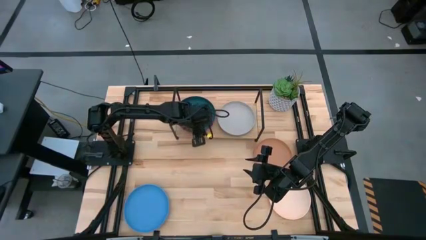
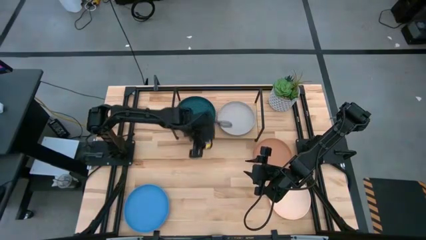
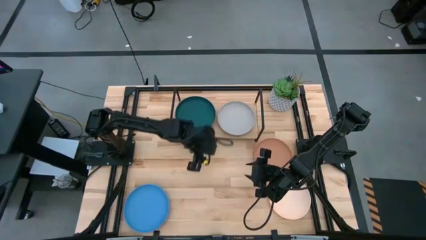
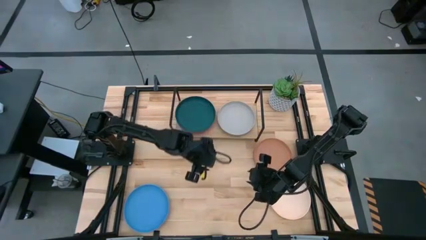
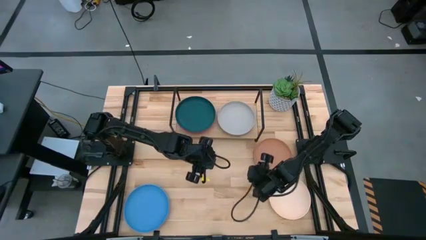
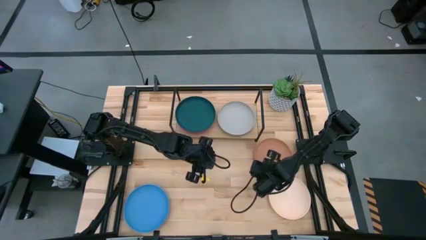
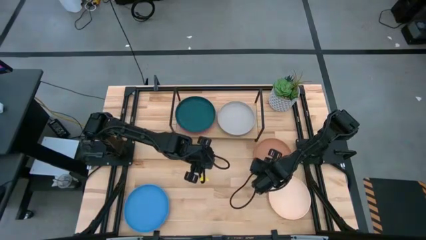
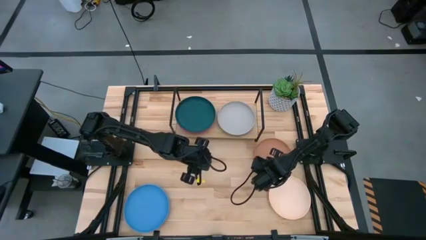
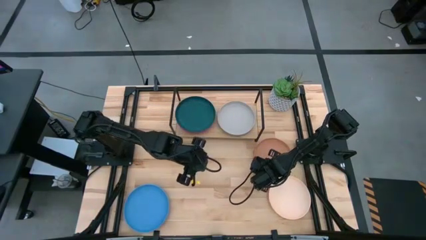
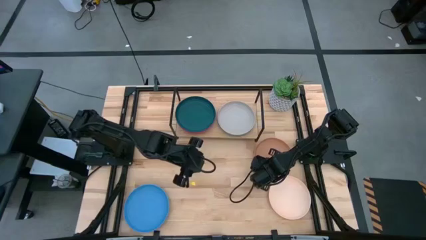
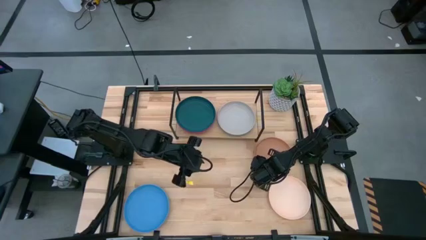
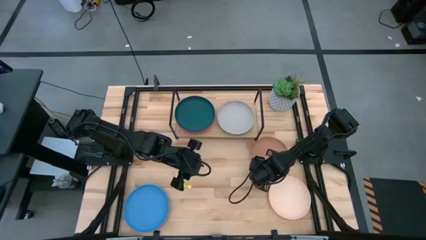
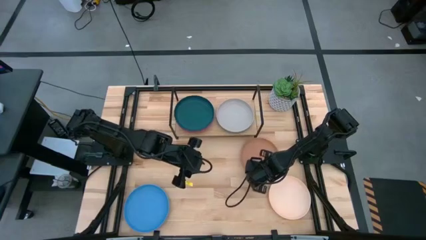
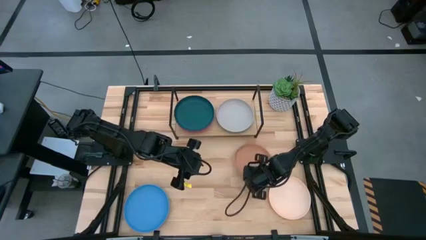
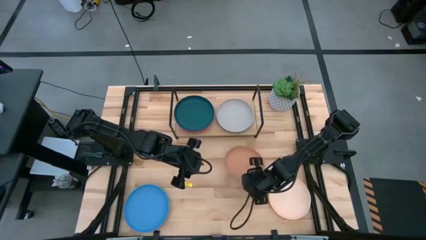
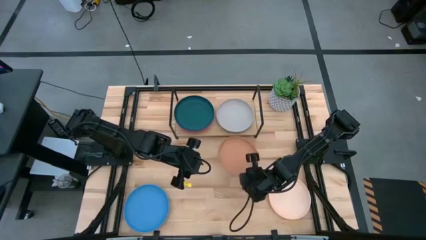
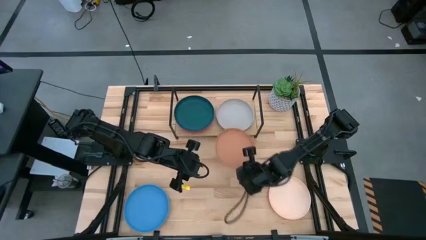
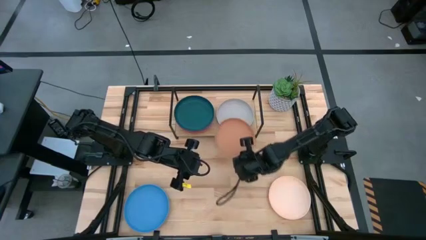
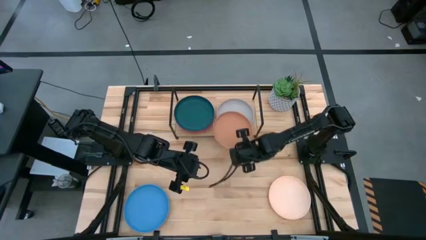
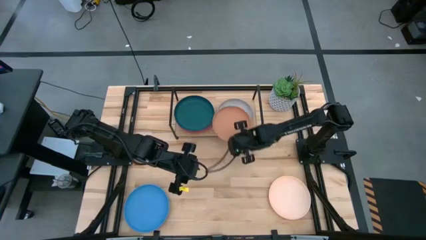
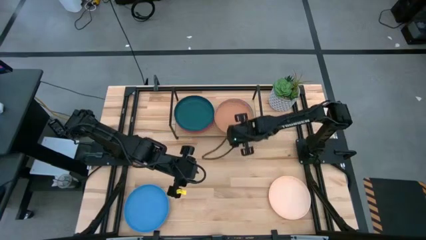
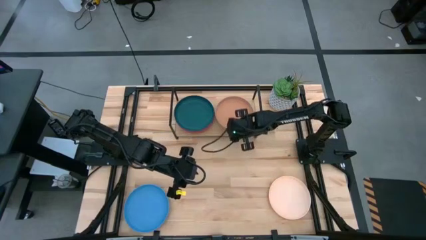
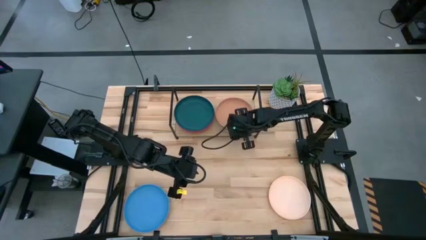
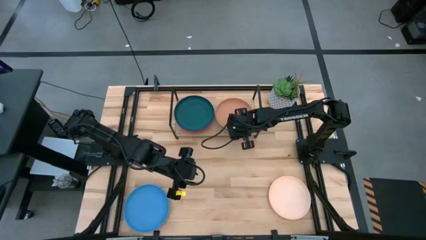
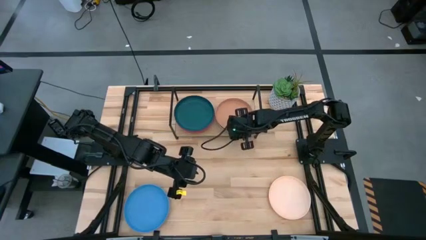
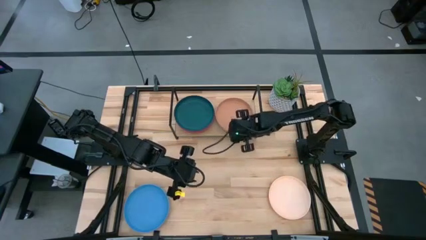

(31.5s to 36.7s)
Task: Place and stack plates onto a shelf
Stack the brown plate on the gray plate

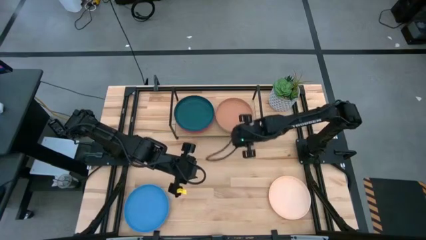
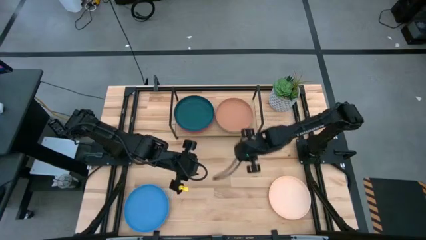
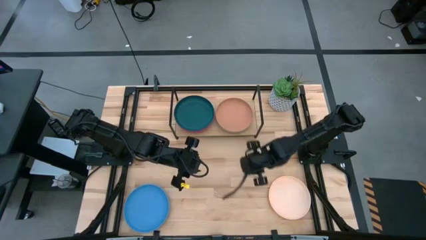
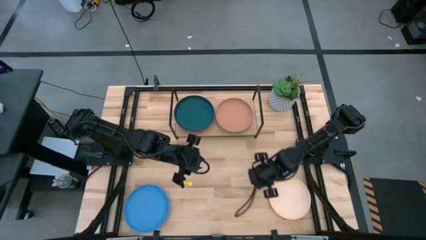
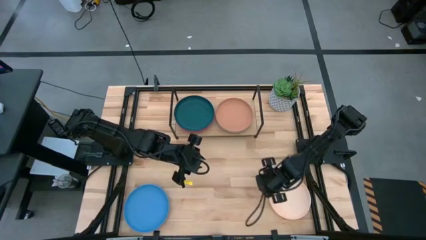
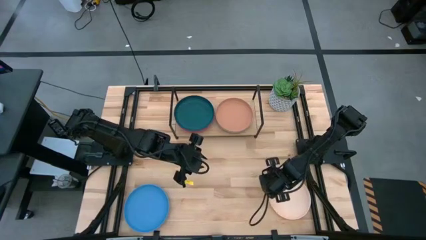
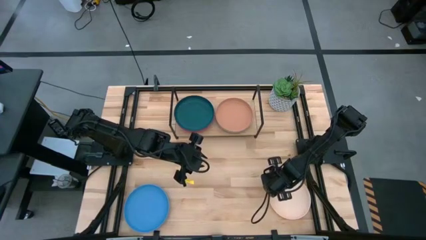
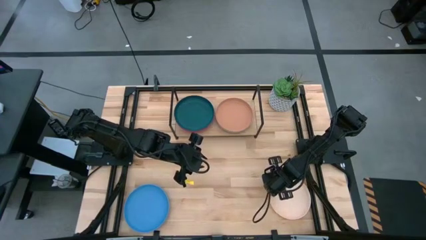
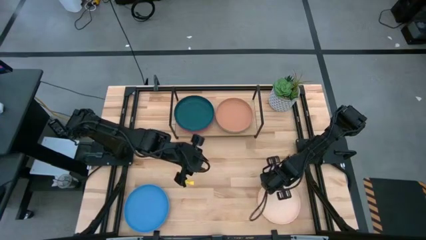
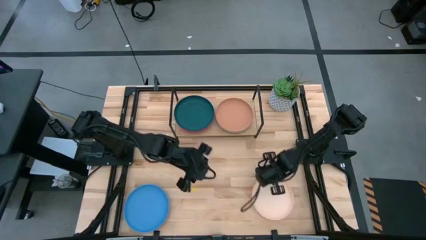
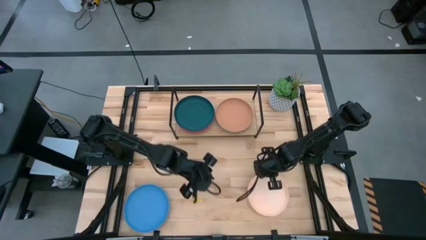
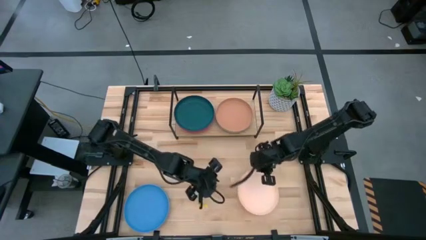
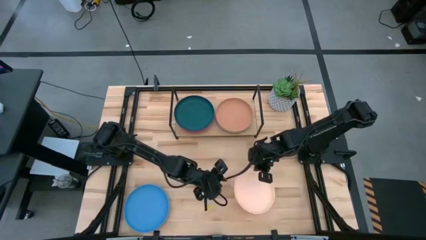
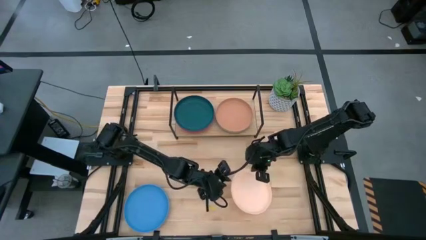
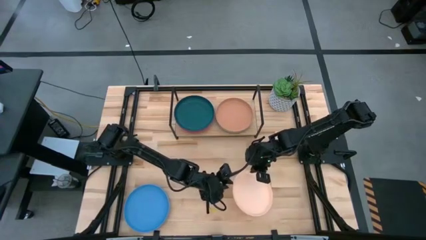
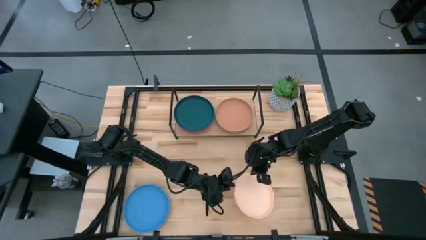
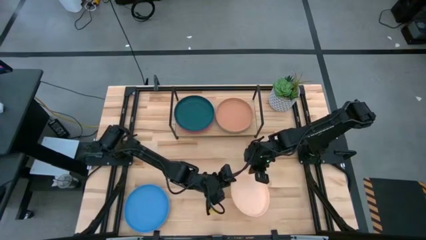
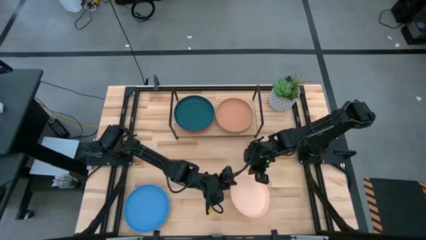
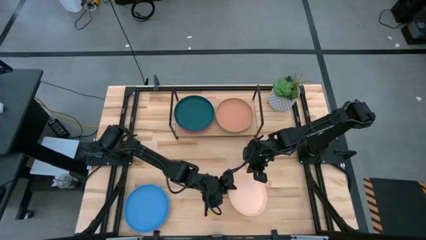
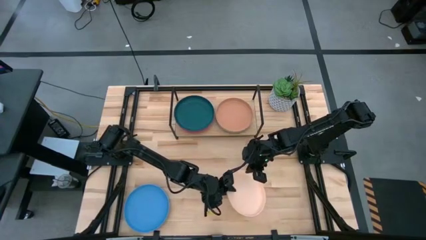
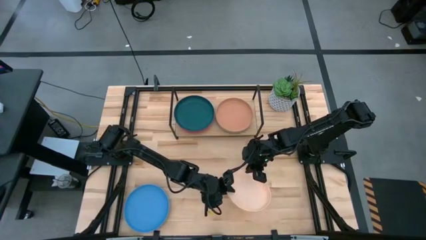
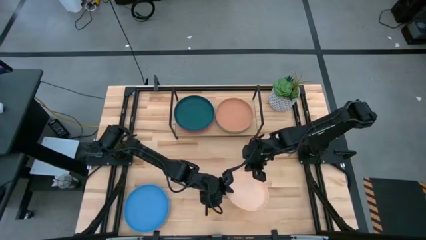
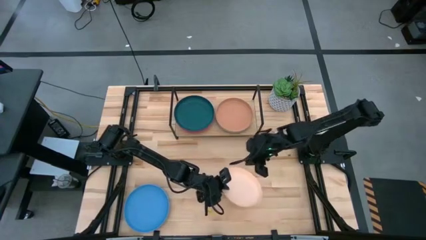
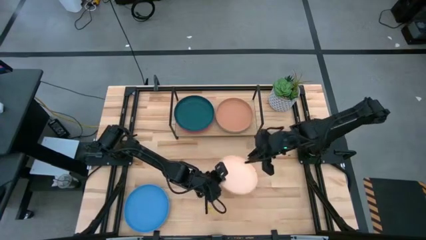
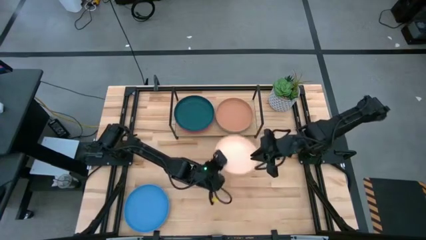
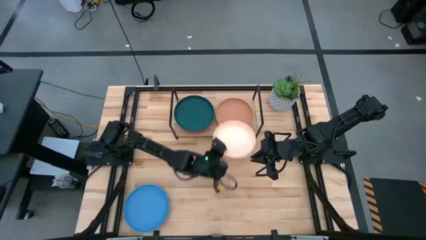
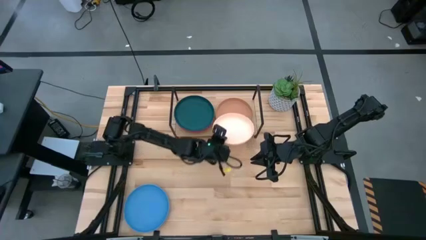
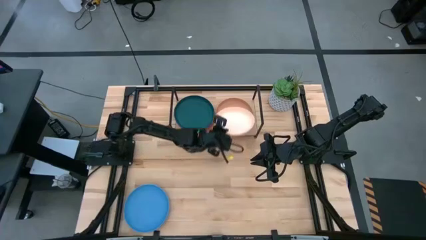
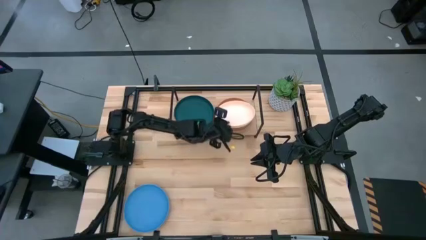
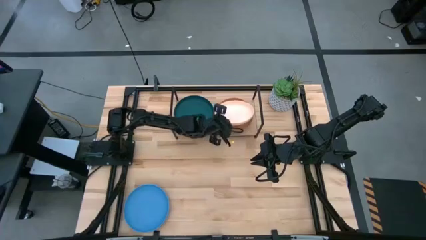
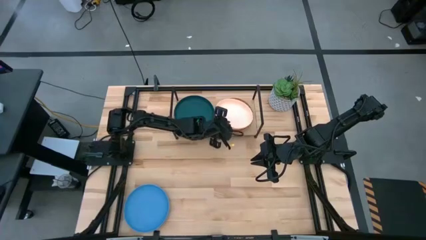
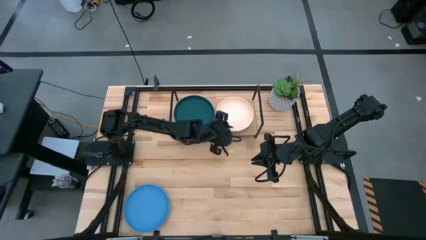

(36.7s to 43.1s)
Stack the light orange plate on the brown plate

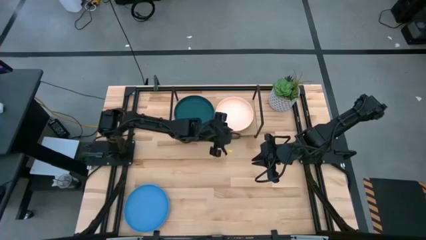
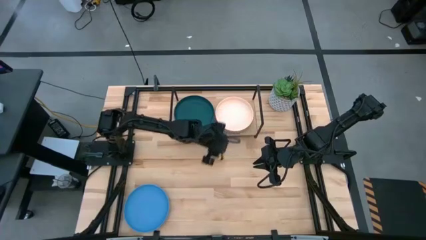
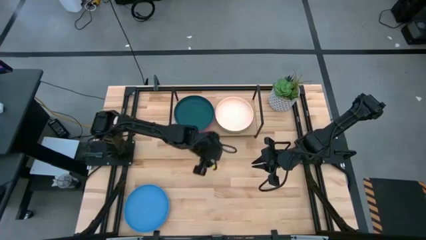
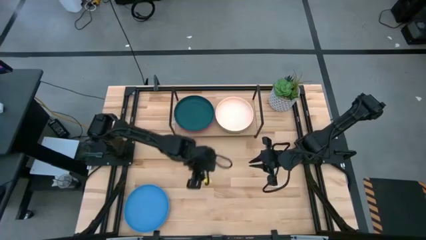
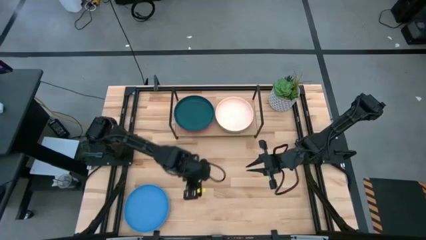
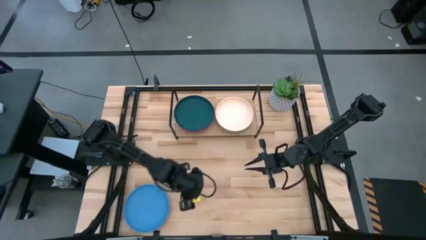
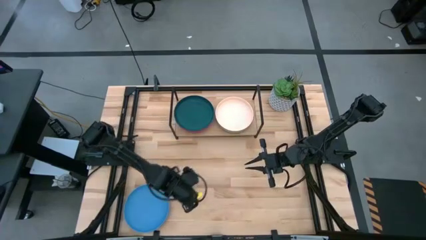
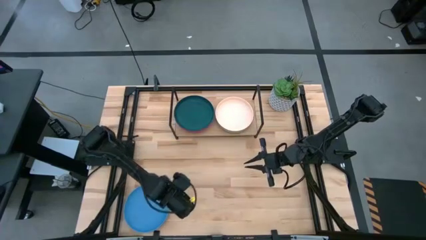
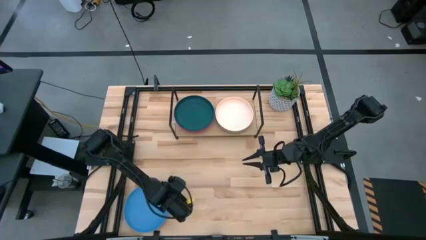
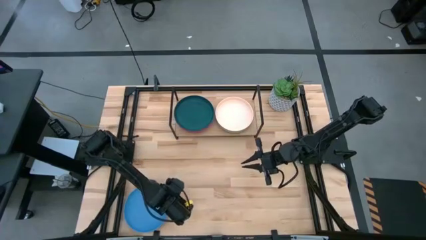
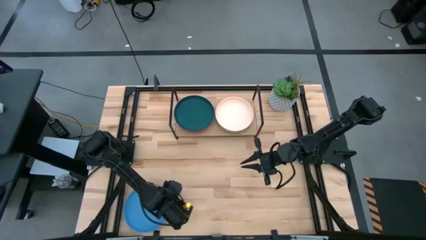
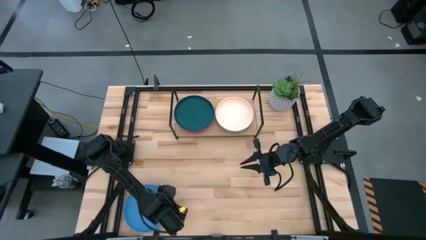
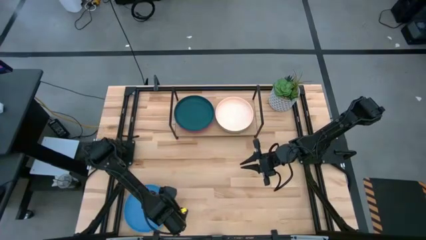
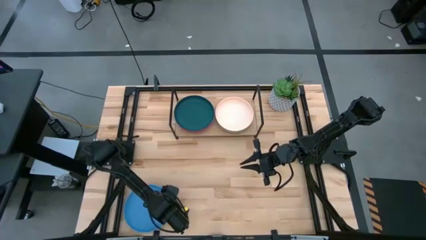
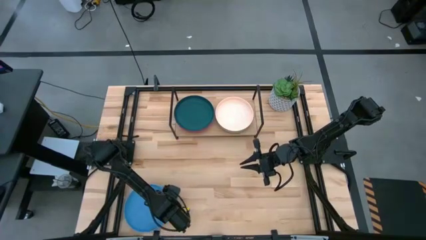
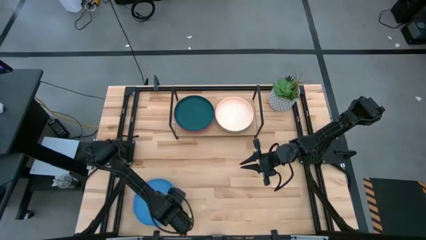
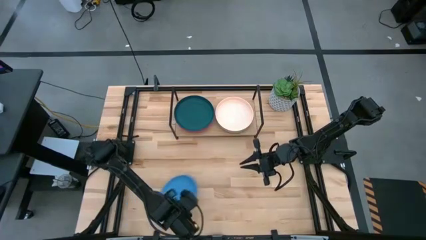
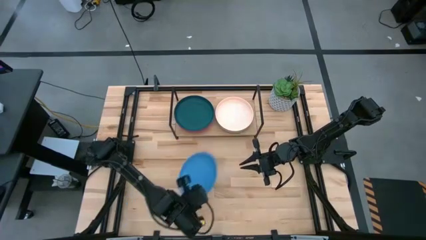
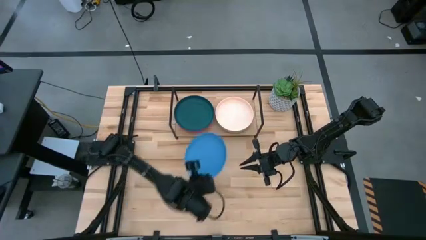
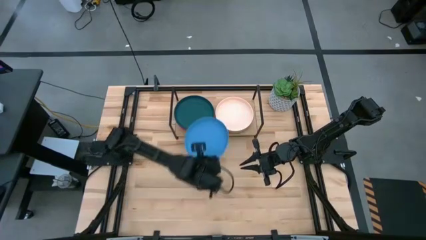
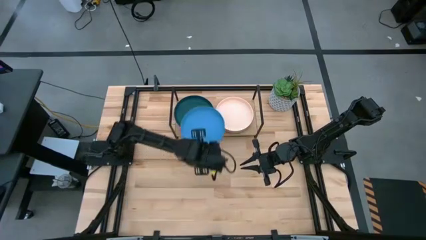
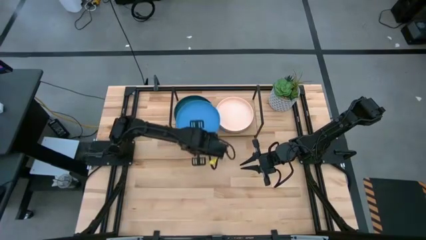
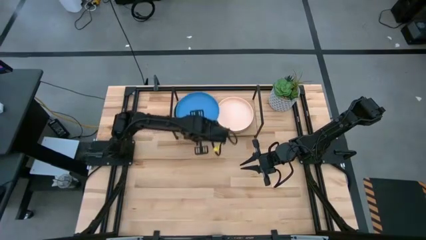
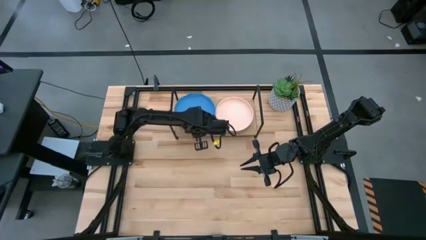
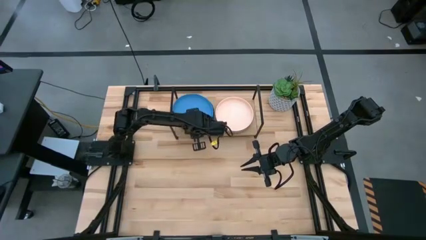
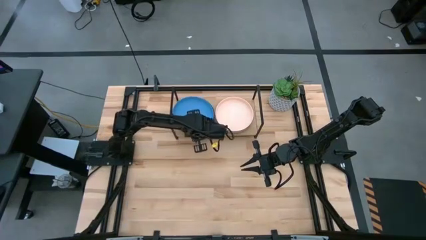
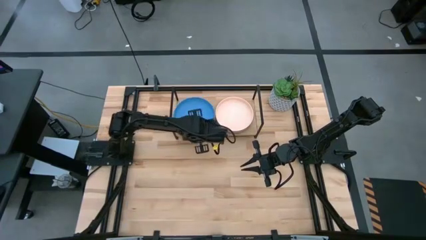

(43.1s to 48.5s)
Stack the blue plate on the dark green plate
